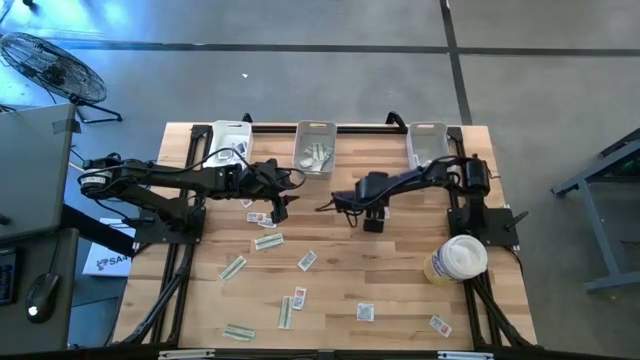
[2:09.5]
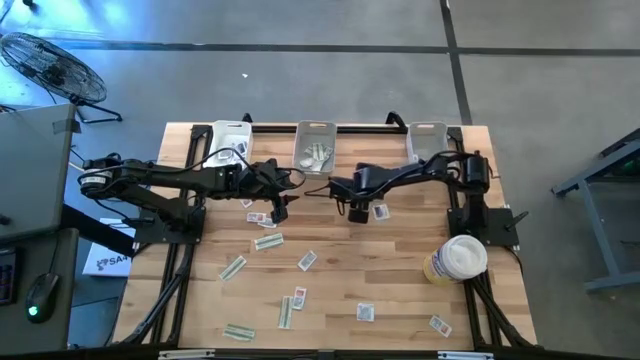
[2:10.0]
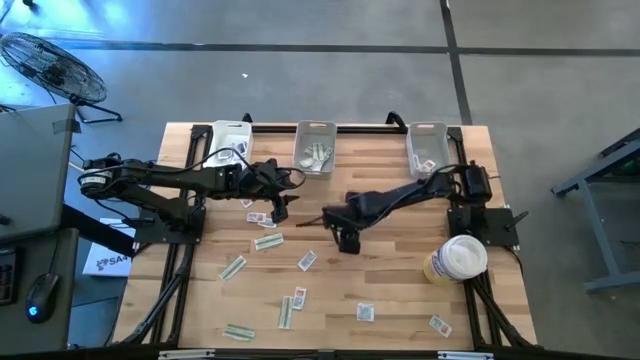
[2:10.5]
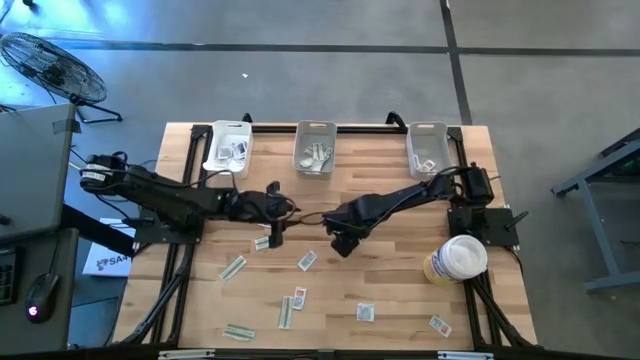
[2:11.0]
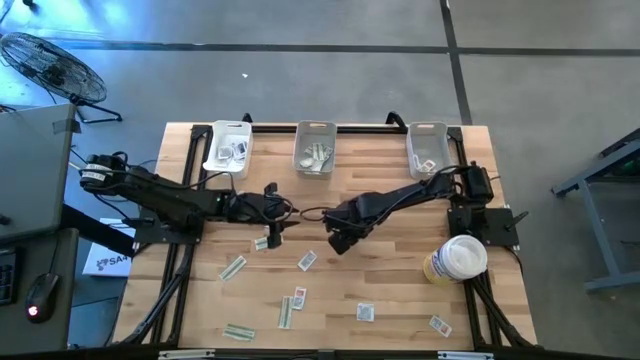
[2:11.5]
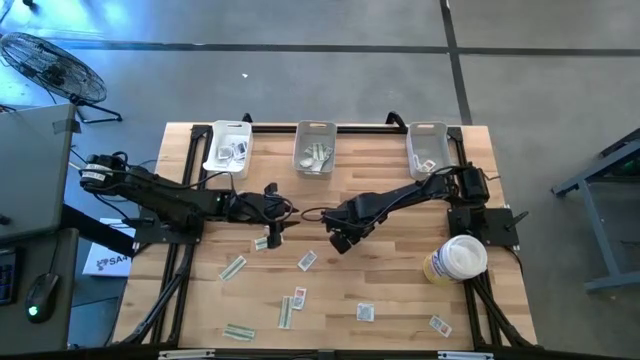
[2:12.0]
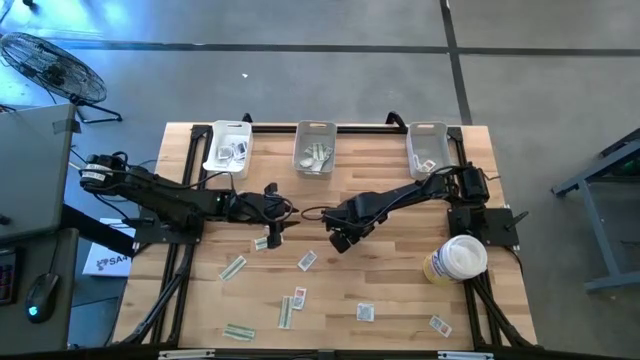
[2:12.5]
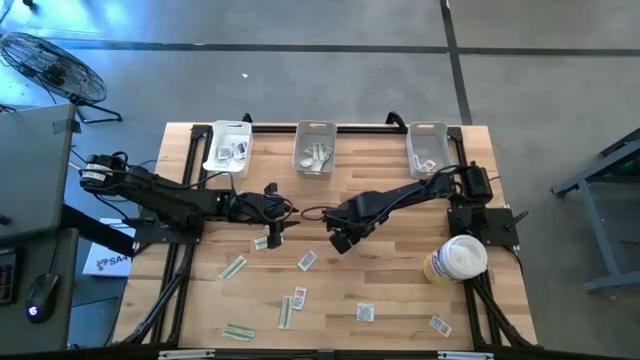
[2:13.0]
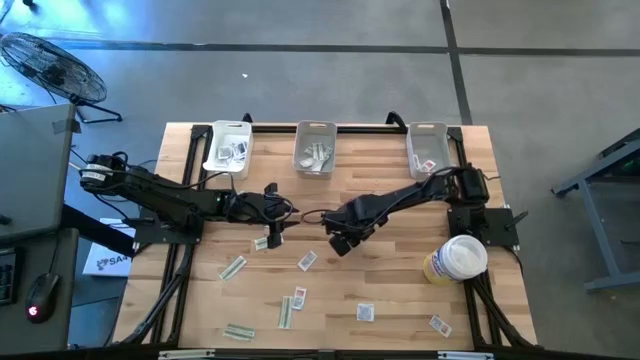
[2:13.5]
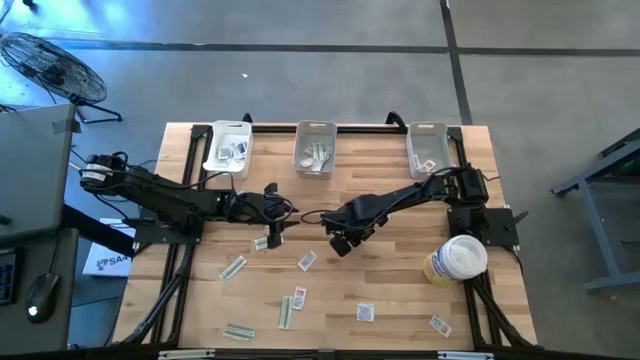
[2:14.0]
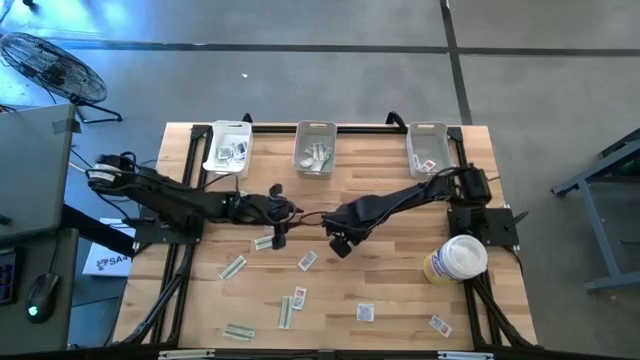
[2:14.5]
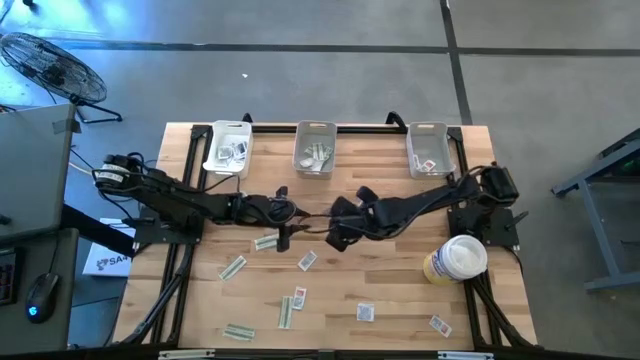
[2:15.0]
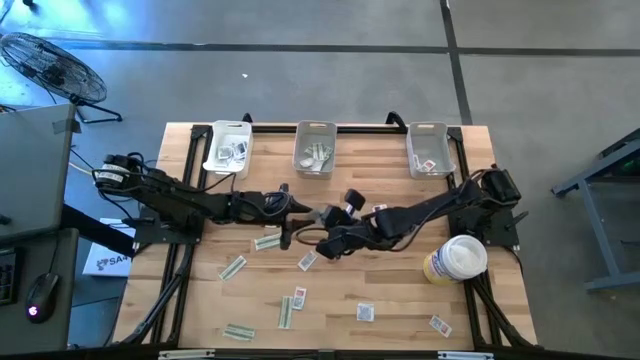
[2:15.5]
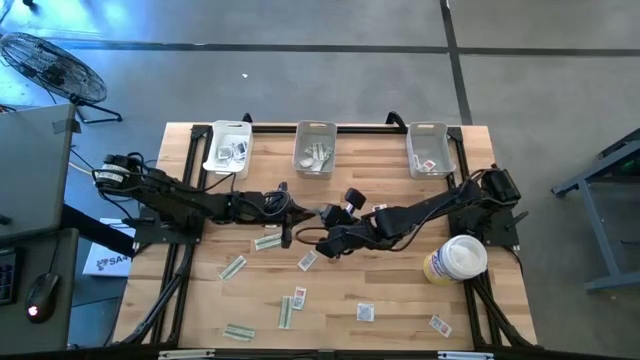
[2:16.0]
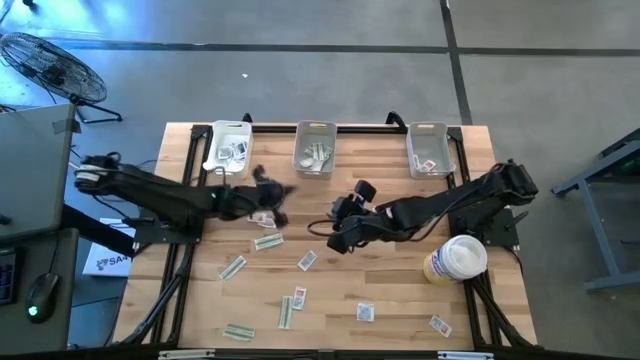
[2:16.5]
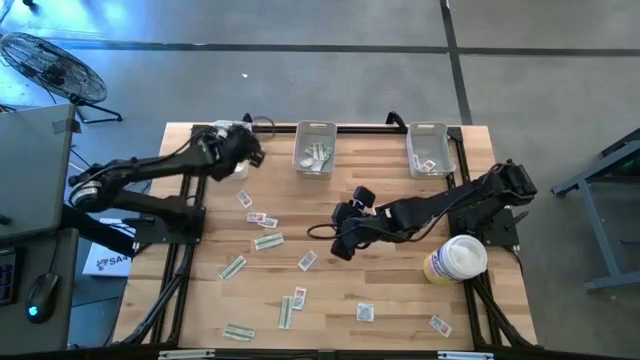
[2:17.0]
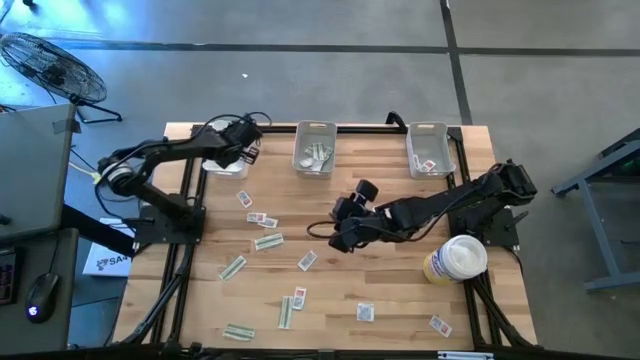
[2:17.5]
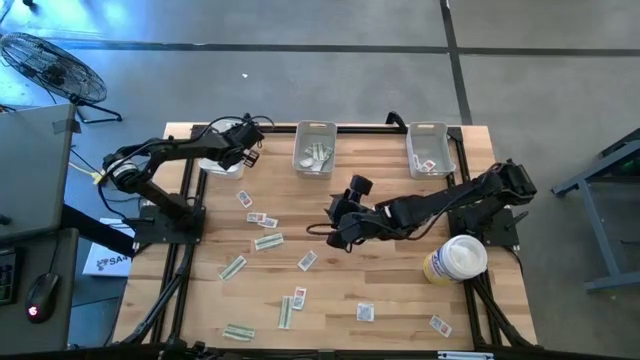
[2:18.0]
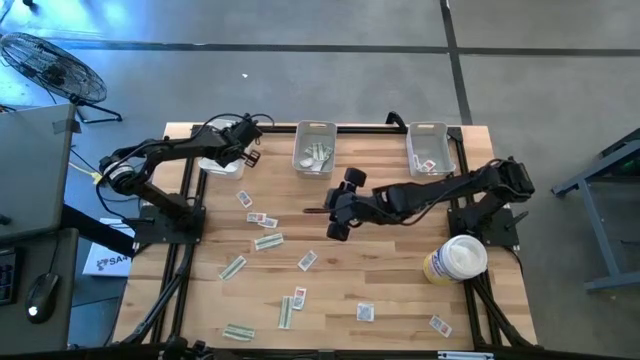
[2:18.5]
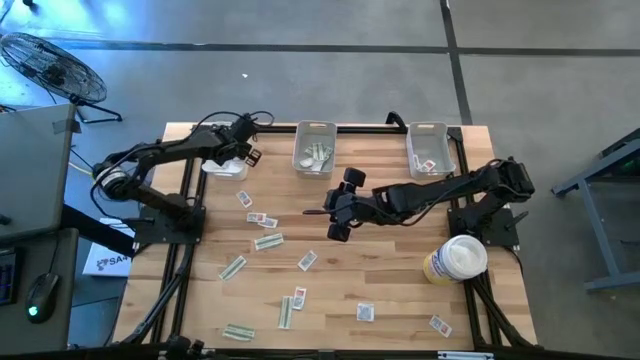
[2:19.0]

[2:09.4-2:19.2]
Task: Pick & Place First Aid Supplies
Put the blue pad into the white bin

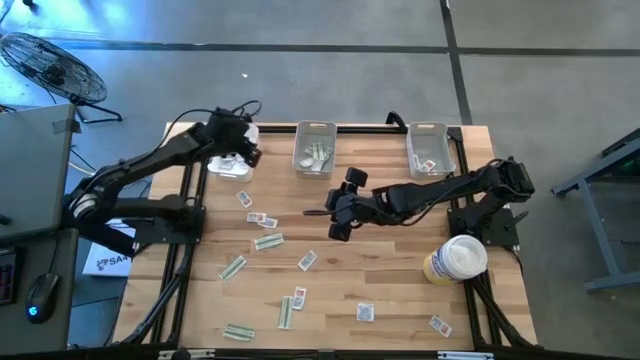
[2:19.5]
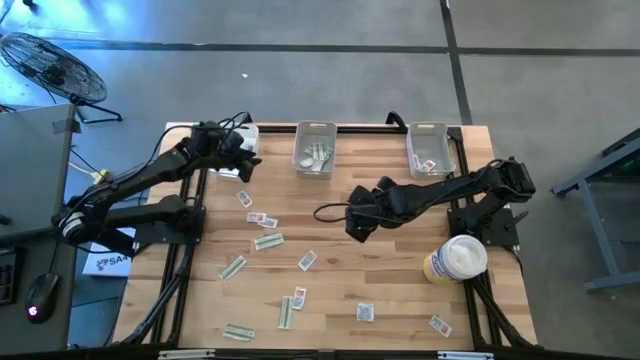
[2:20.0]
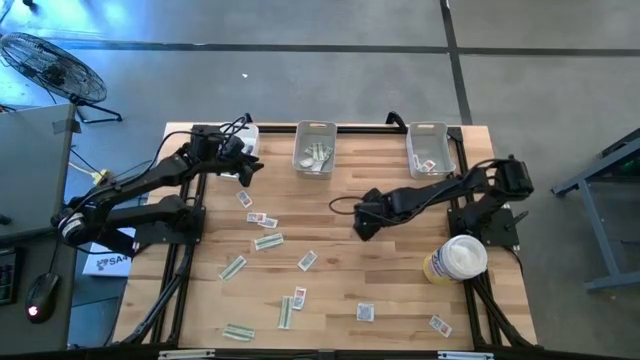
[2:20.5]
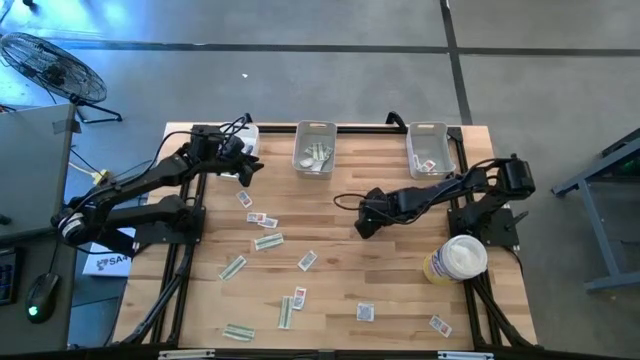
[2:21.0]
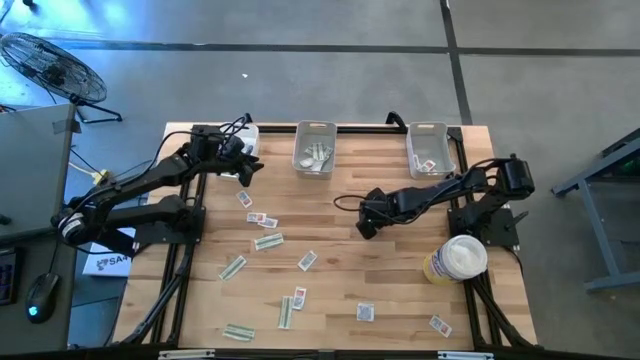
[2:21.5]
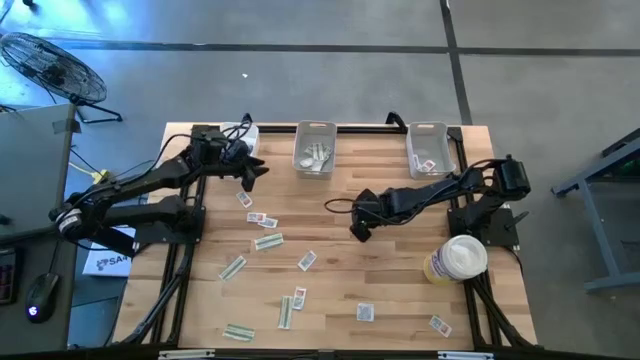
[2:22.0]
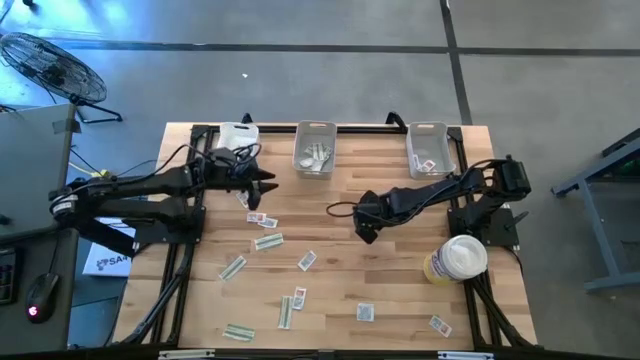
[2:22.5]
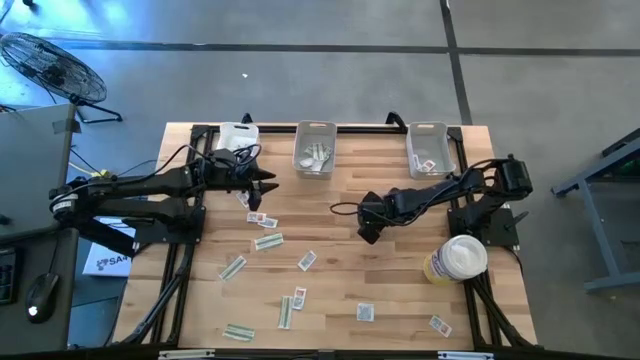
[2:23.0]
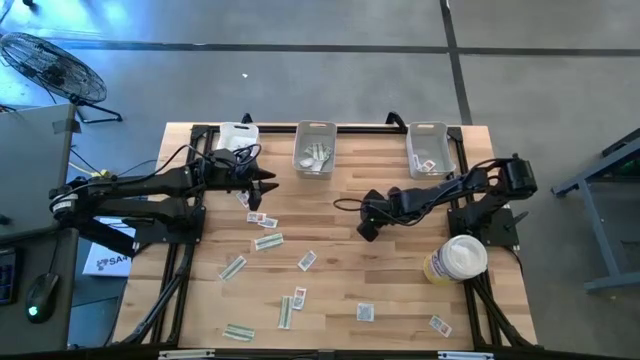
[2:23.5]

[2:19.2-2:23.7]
Put the blue pad into the white bin

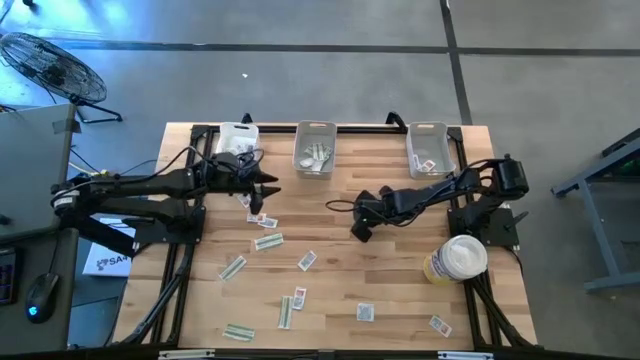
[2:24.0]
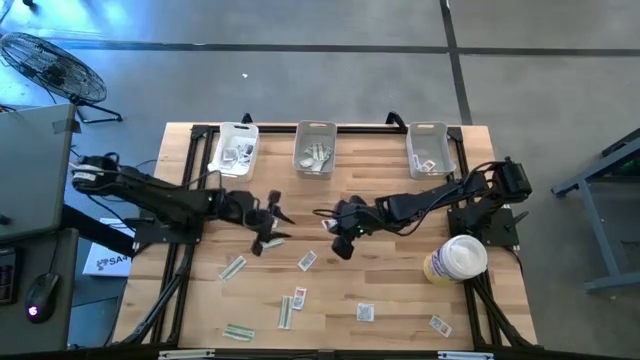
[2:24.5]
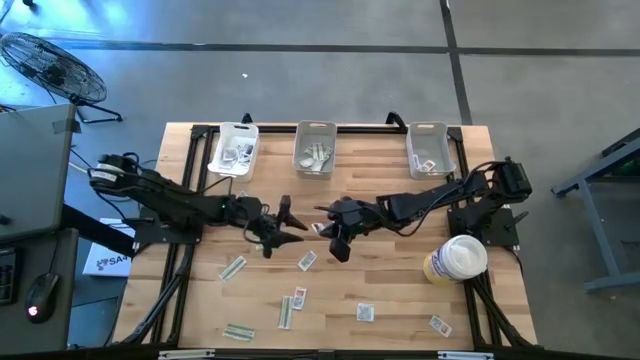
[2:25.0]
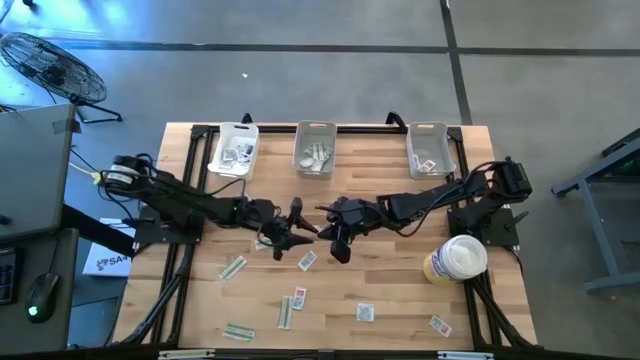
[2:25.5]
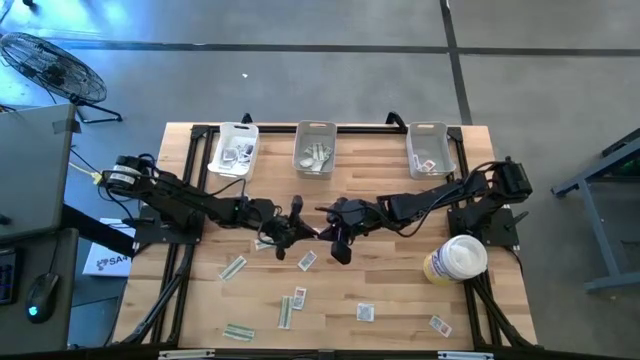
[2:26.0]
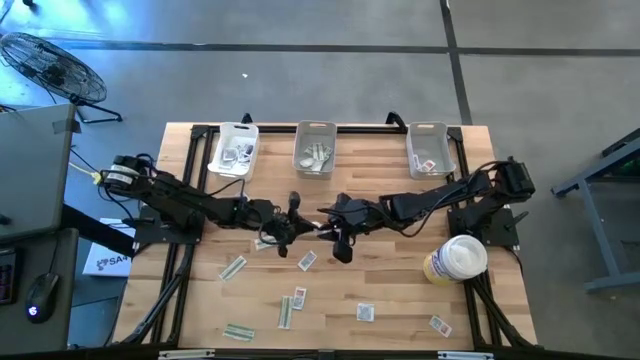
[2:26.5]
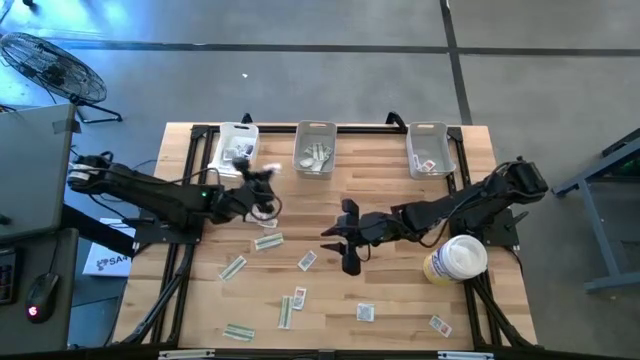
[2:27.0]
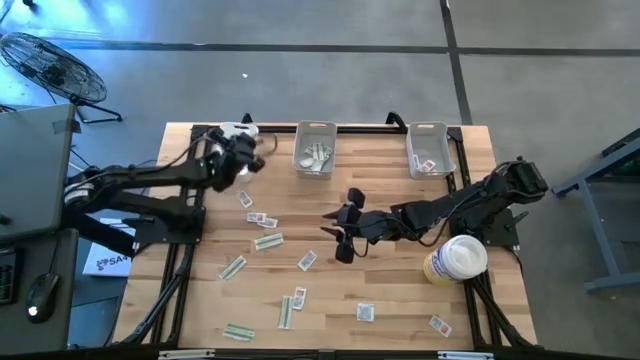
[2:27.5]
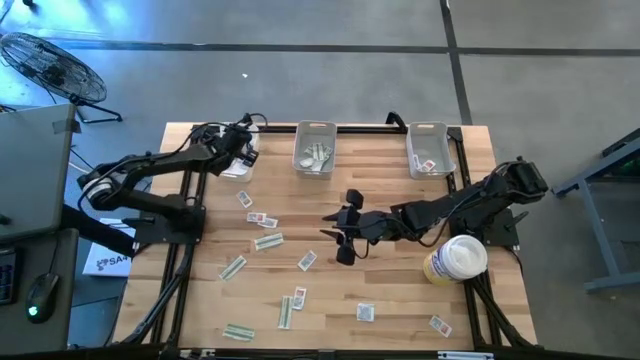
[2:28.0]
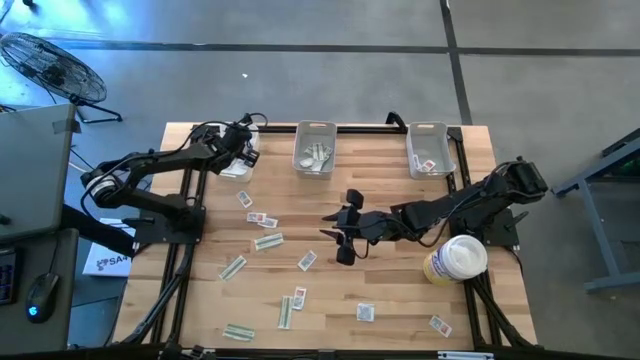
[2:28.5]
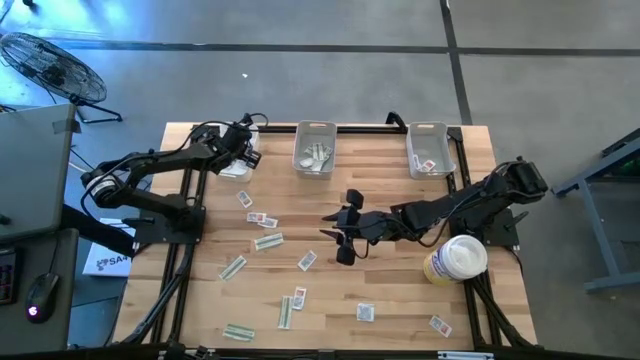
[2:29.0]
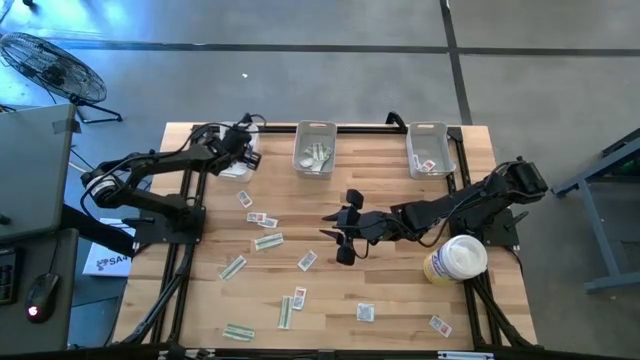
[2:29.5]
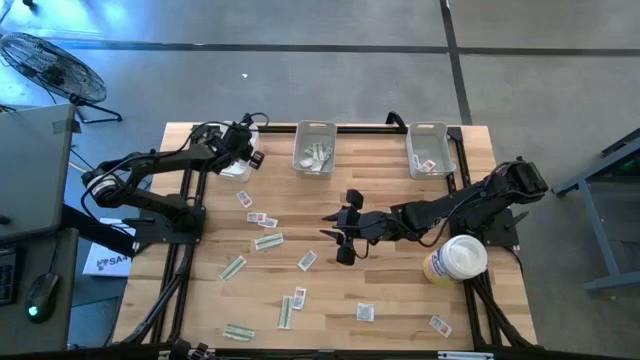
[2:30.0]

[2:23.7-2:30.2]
Put the blue pad into the white bin

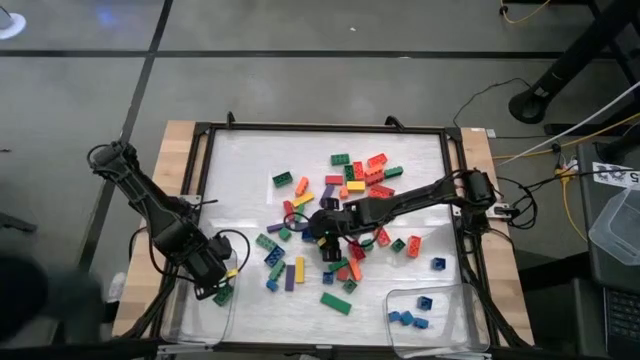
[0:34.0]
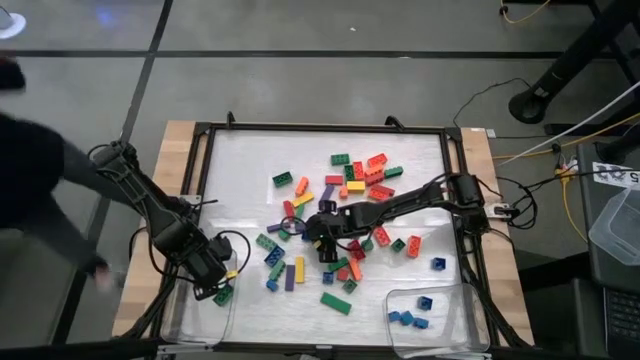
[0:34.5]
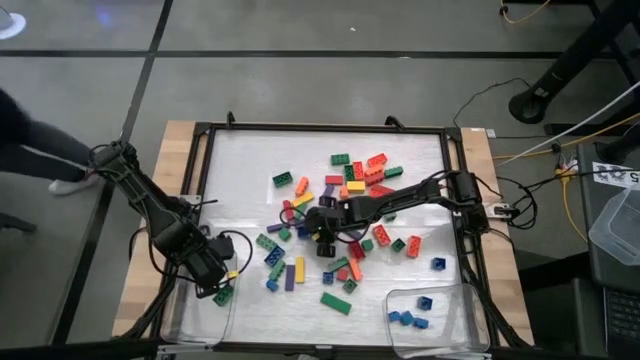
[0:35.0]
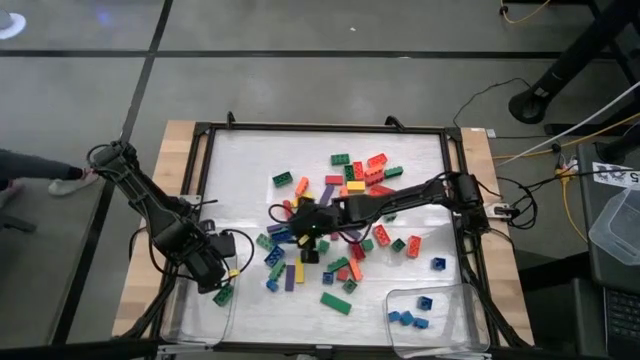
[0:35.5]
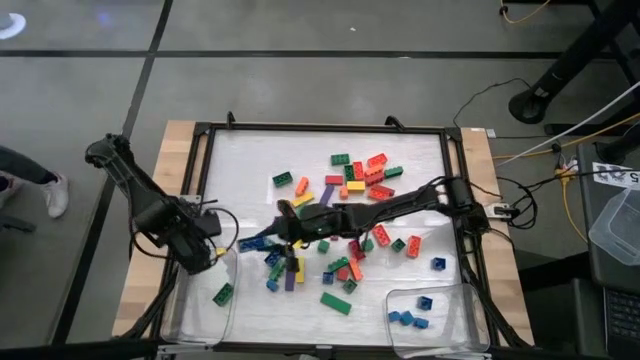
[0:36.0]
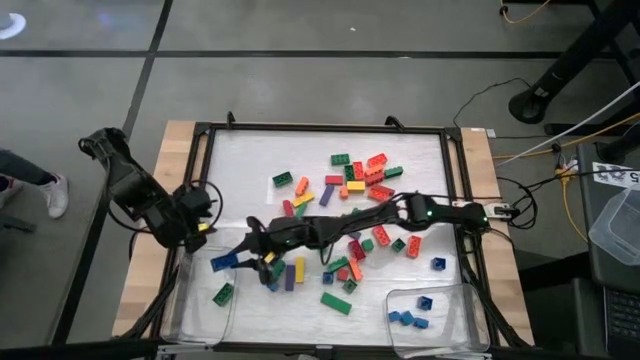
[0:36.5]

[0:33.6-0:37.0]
Task: Sort blocks by size
Put the large blue game piece into the left transparent bin
